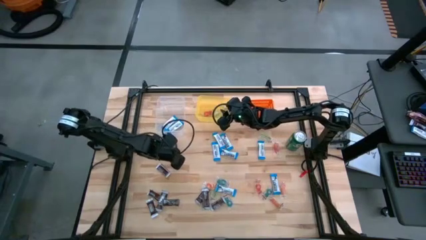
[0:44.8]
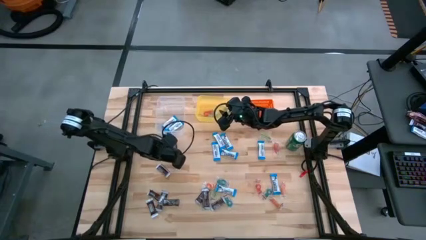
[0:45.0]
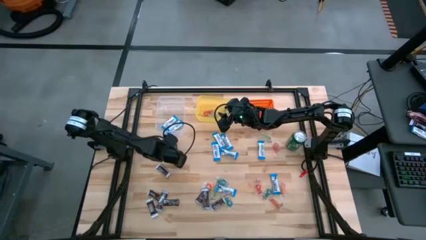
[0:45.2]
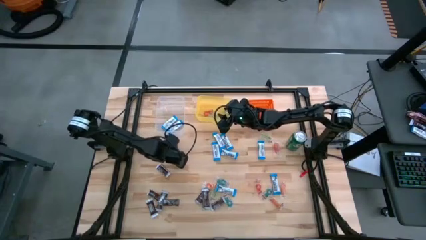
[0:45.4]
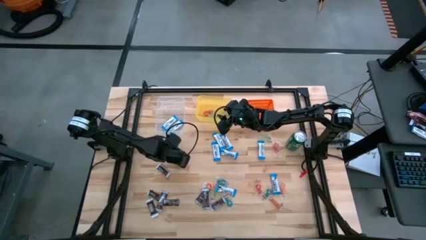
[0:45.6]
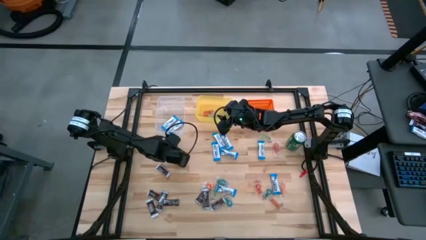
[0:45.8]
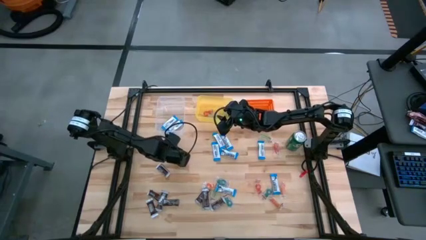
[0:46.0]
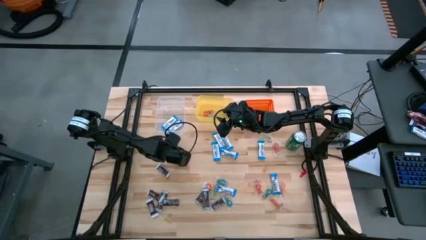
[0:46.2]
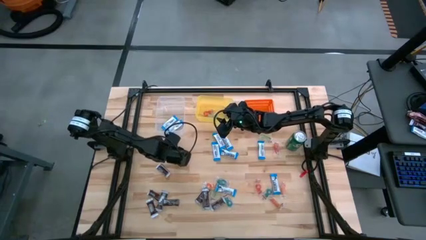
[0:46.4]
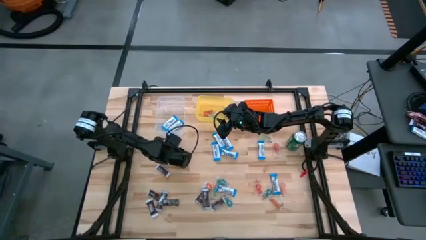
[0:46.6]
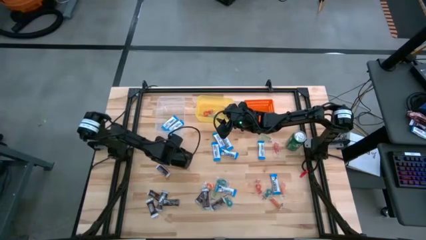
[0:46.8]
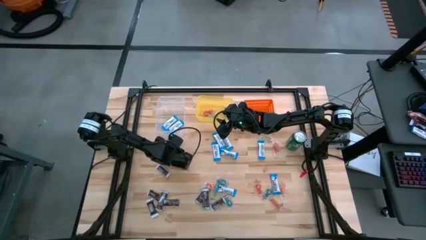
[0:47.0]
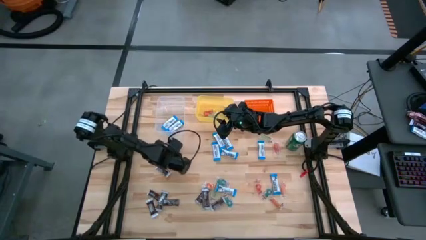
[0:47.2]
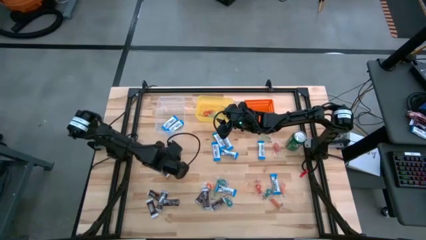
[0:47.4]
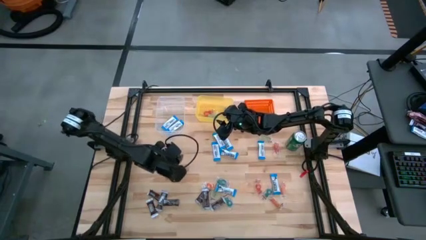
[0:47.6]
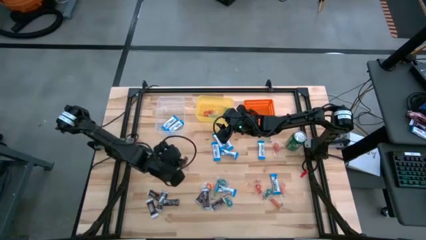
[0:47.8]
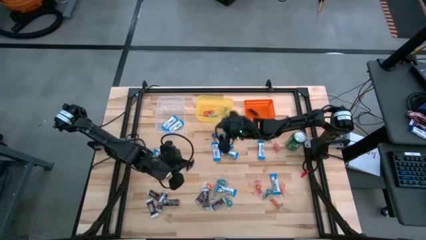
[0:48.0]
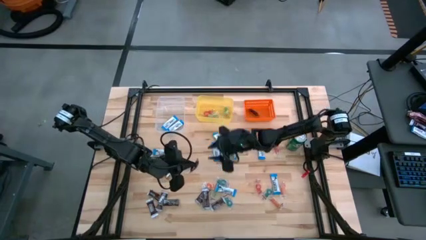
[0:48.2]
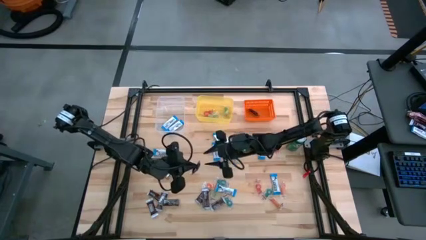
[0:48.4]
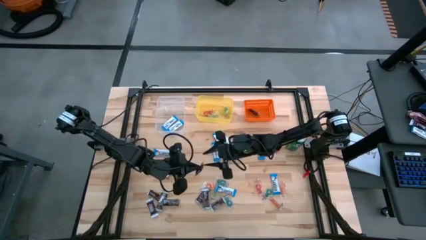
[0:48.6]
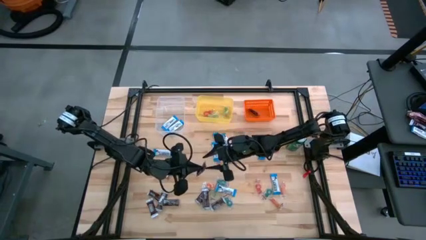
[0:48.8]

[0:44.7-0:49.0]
Task: Sort candy
Put the black chocolate into the orange bin

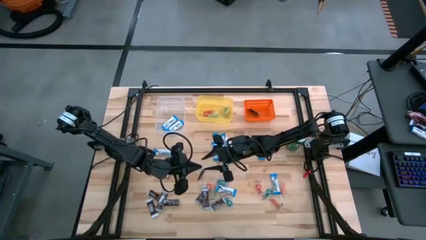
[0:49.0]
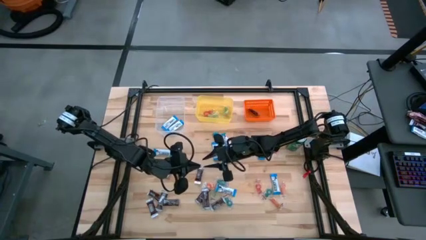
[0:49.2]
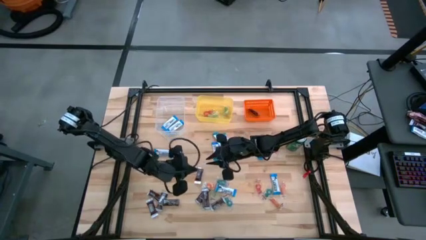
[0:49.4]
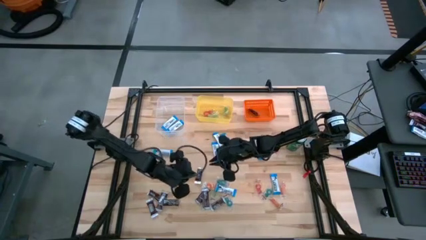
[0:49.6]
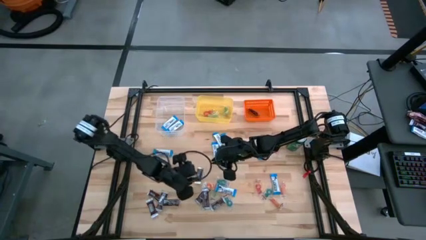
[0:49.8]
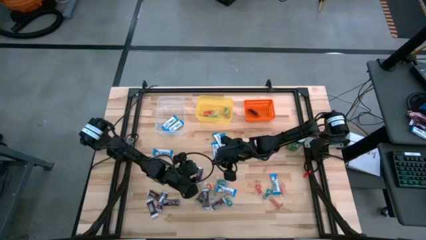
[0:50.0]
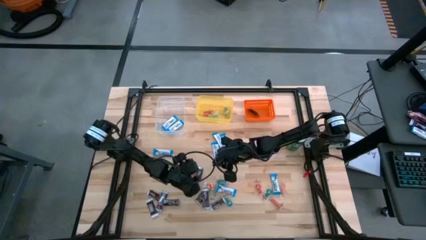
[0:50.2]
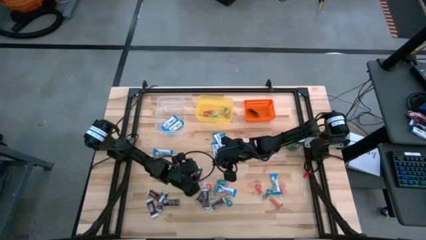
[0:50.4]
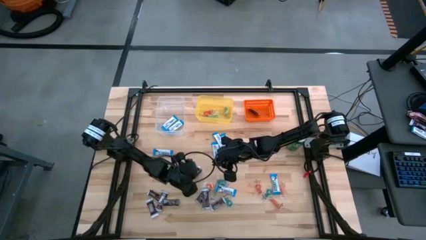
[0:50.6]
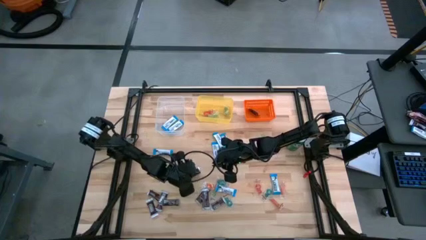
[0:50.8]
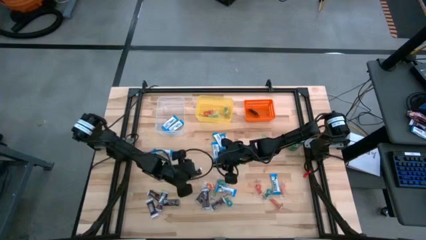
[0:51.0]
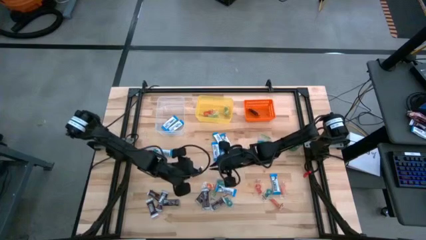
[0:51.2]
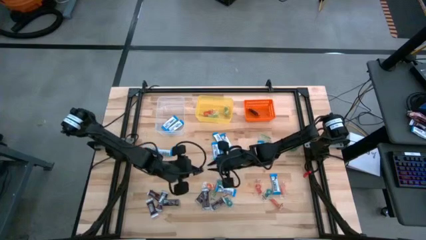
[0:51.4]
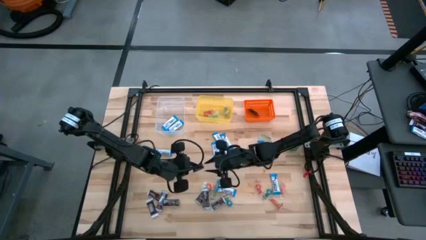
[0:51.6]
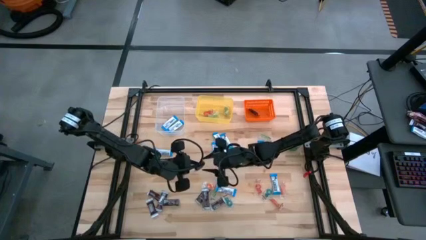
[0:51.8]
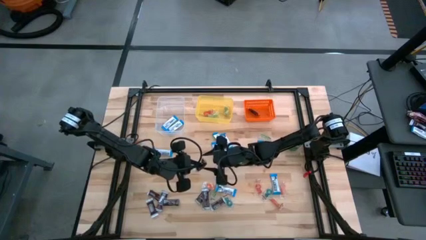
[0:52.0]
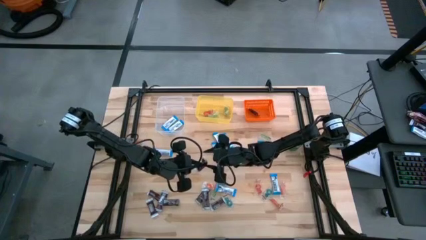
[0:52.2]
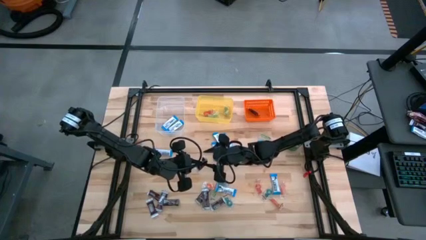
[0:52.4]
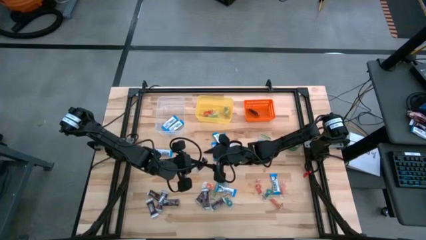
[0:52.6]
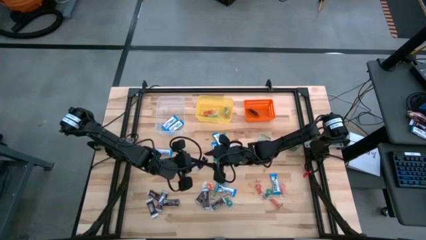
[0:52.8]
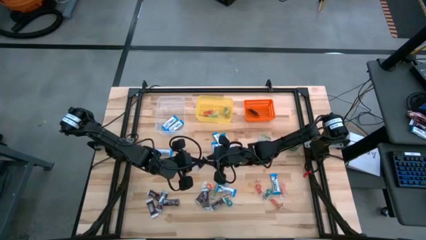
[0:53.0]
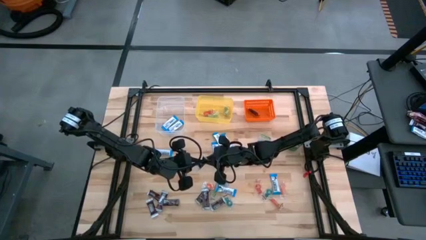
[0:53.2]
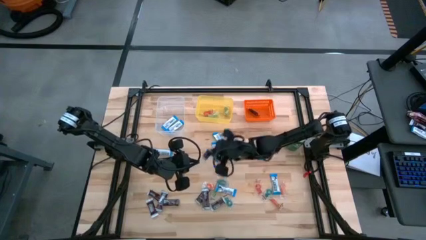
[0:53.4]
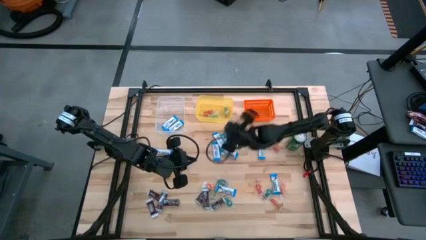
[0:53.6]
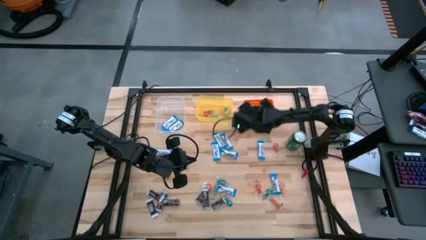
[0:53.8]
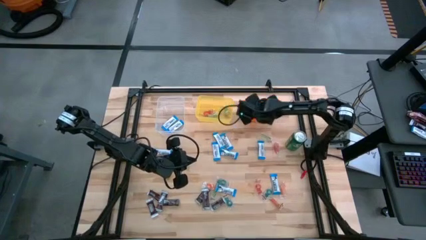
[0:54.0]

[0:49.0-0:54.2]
Put the black chocolate into the orange bin

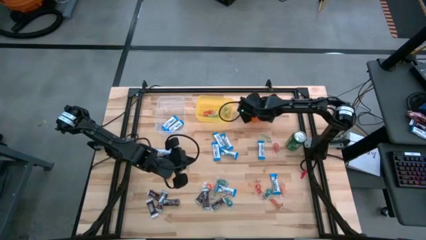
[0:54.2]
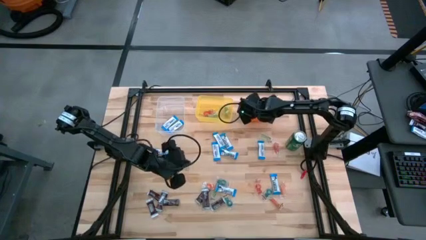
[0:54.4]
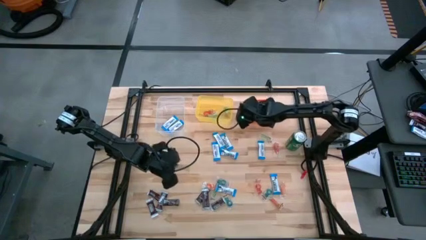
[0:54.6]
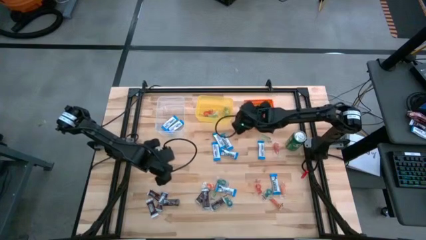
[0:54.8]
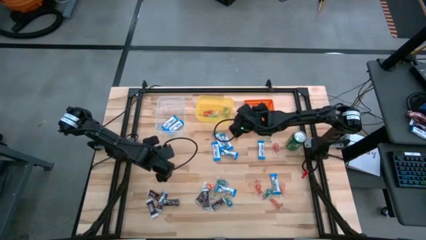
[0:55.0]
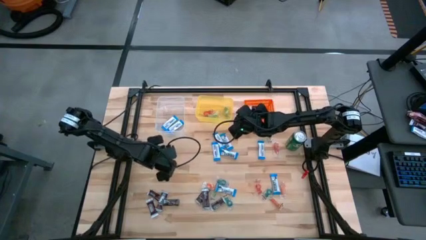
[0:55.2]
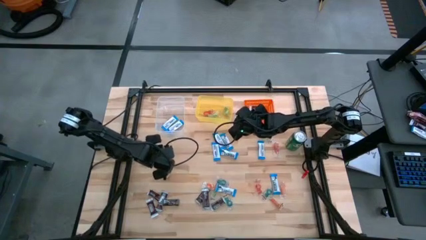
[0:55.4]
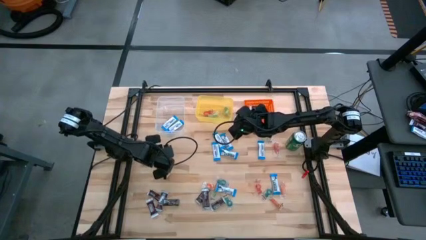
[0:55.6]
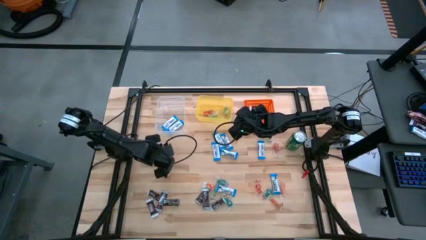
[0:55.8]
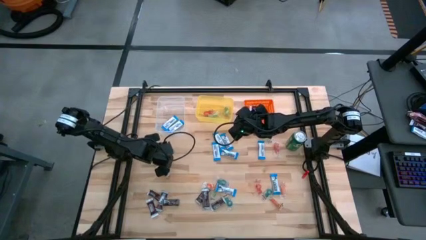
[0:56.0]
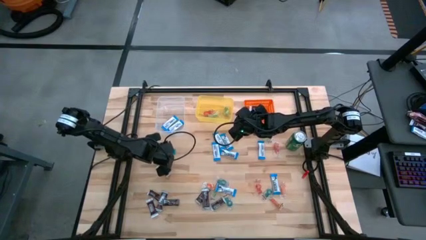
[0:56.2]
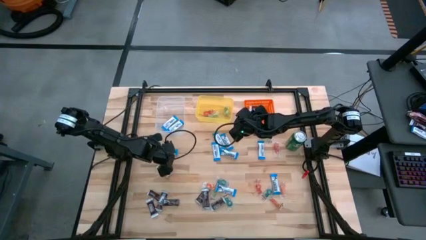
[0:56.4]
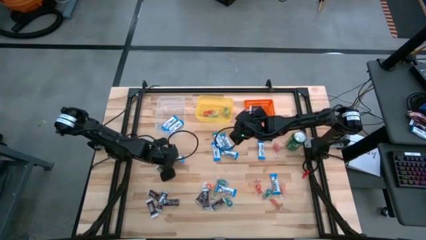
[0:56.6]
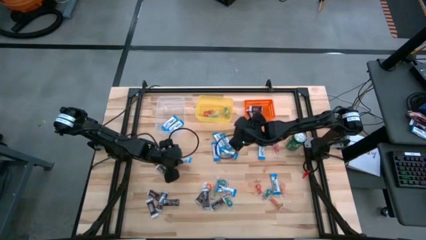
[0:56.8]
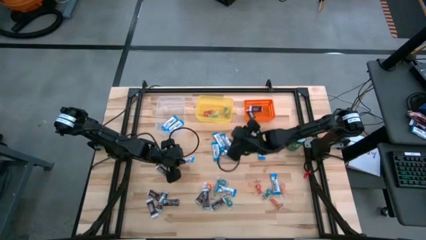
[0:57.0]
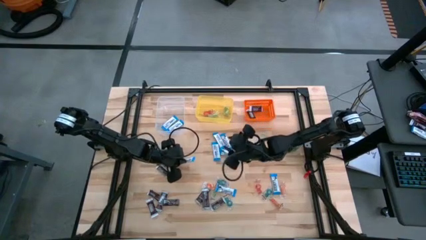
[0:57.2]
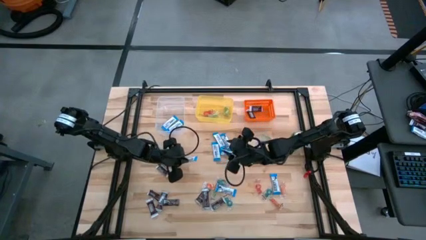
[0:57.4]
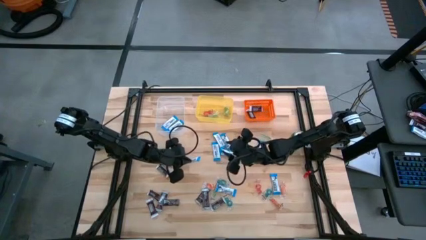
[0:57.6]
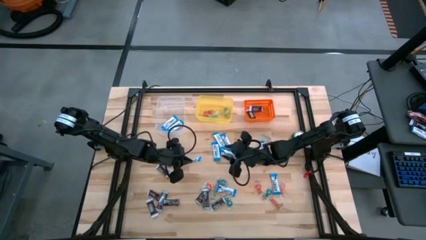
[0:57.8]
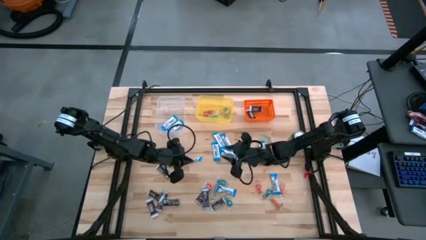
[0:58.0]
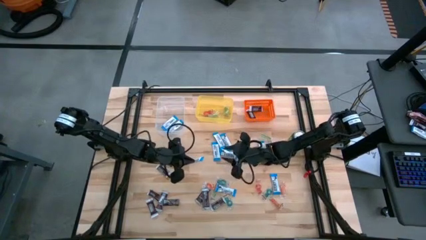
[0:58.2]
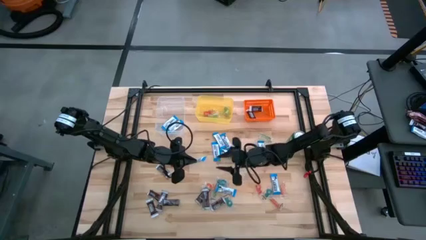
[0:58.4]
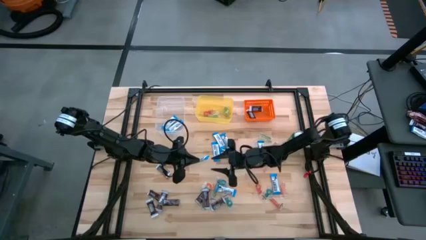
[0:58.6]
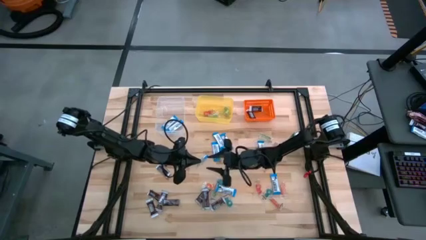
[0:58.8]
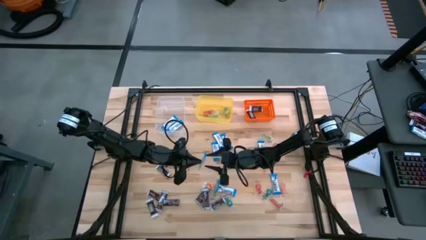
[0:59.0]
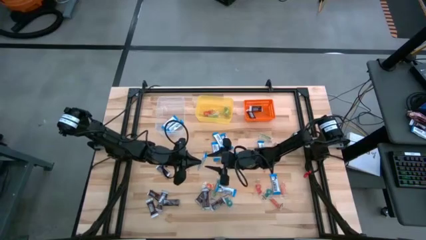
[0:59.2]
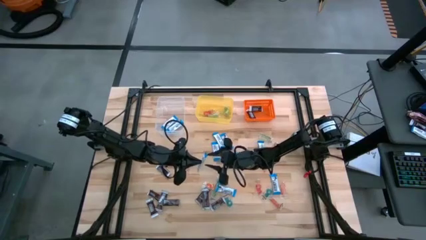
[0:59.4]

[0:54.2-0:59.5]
Put the white chocolate into the transparent bin

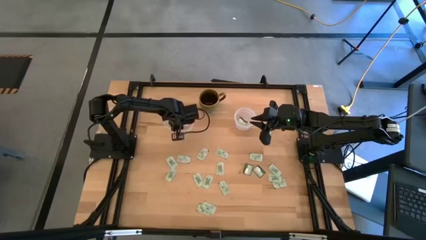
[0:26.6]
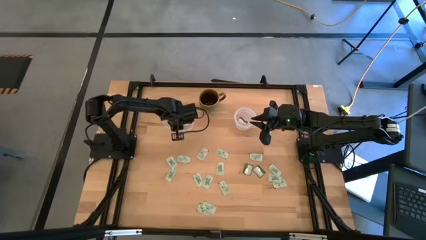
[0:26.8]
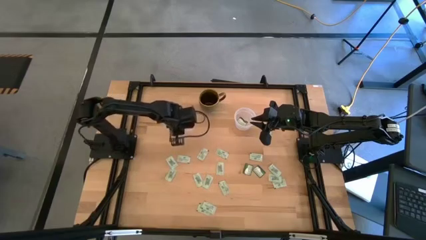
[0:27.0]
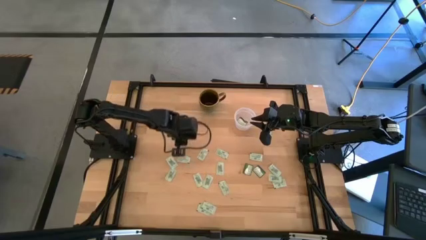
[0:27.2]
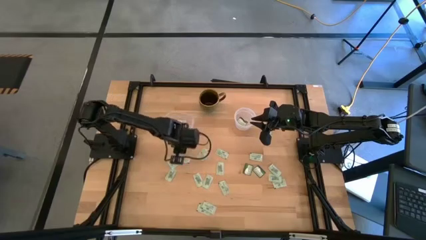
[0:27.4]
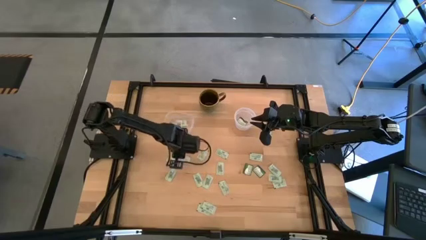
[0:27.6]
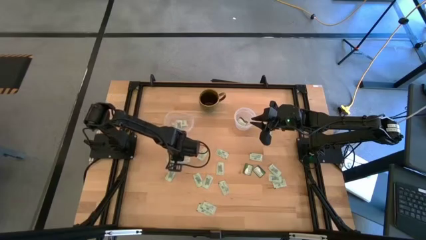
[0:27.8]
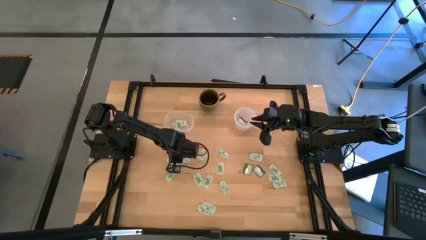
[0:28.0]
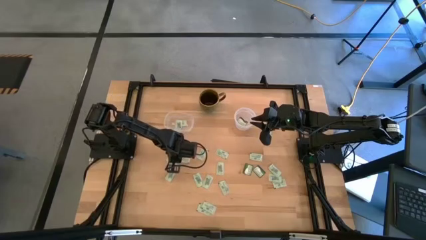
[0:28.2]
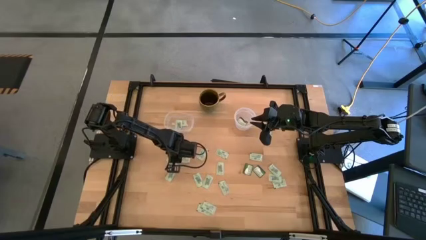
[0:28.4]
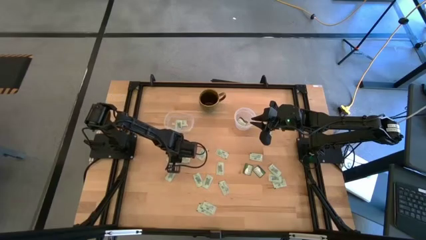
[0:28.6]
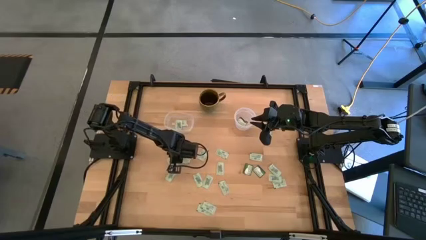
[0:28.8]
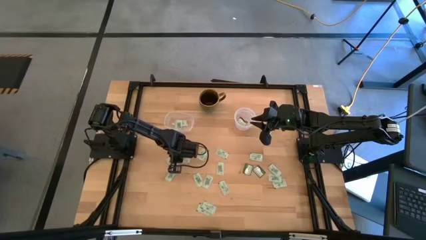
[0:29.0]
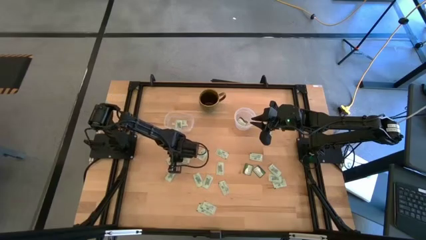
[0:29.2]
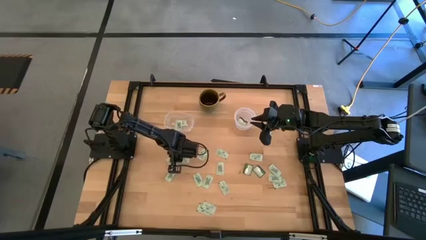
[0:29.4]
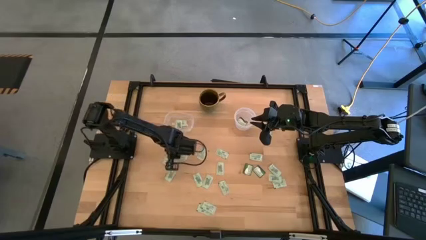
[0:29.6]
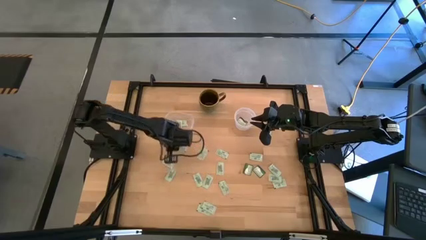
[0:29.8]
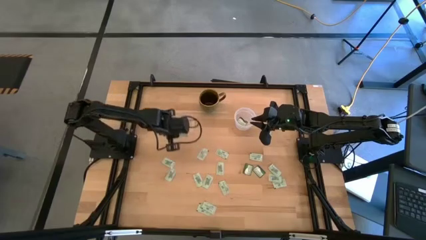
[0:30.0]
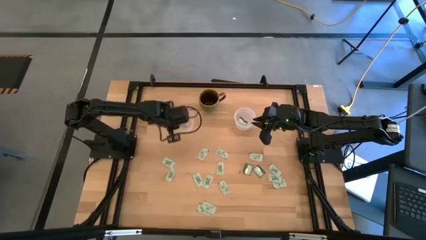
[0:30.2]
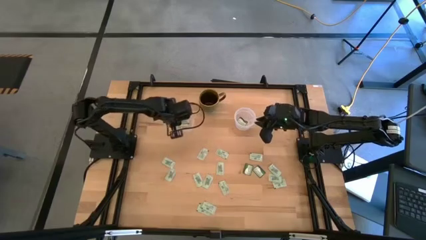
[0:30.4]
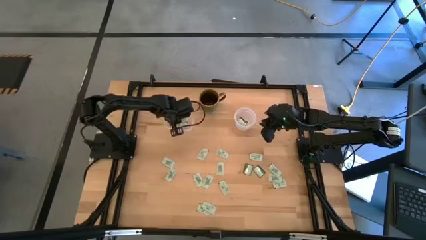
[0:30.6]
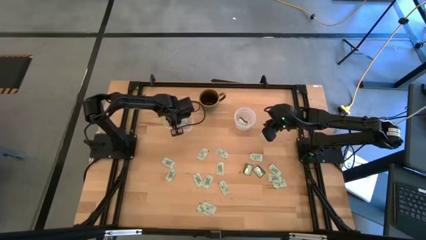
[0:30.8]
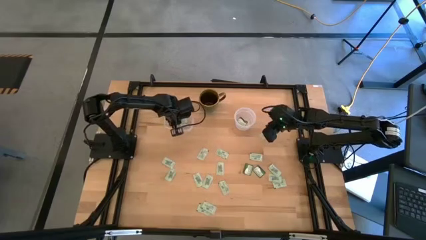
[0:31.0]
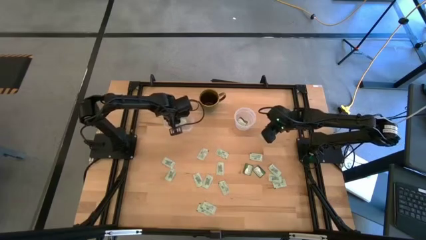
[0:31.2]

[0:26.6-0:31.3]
Task: Pick and place Stevia / Truvia into bins
Put the light green stevia packet into the left transparent container
